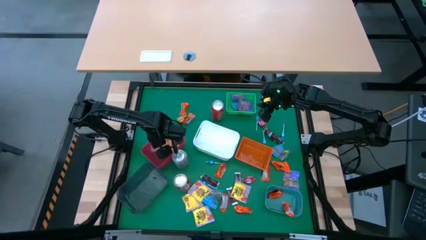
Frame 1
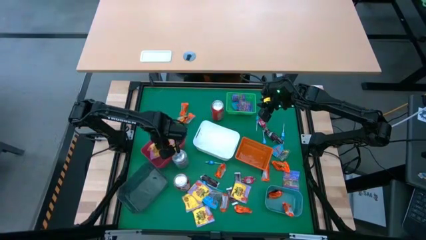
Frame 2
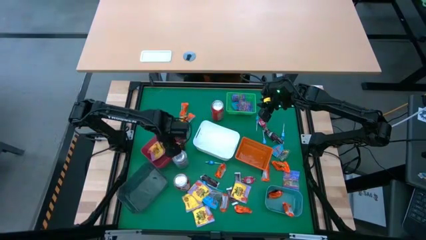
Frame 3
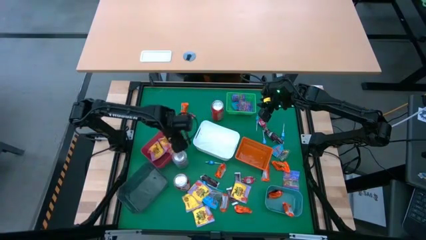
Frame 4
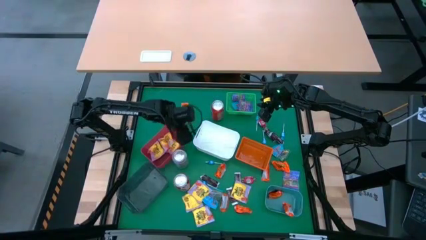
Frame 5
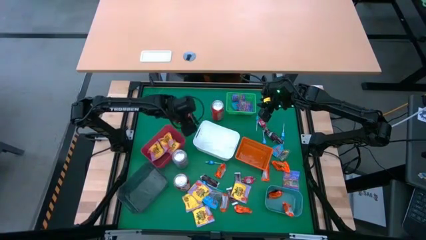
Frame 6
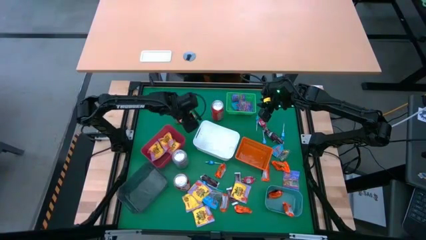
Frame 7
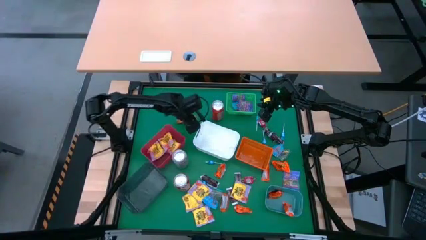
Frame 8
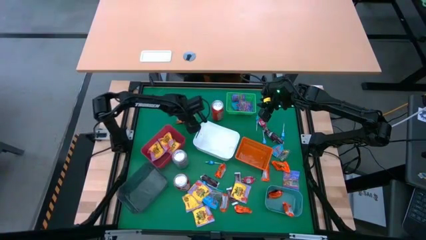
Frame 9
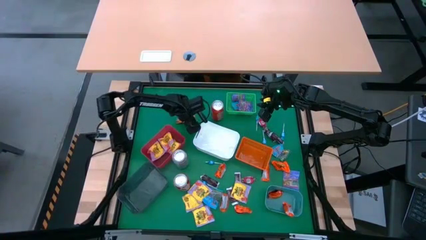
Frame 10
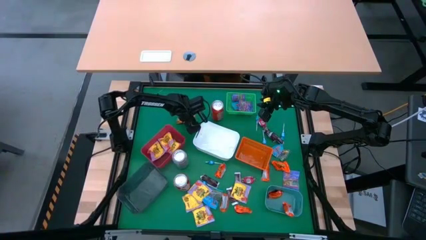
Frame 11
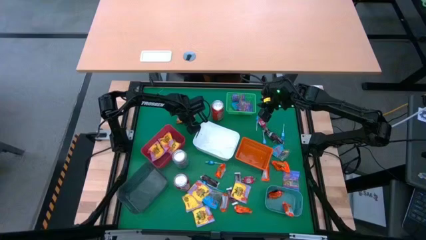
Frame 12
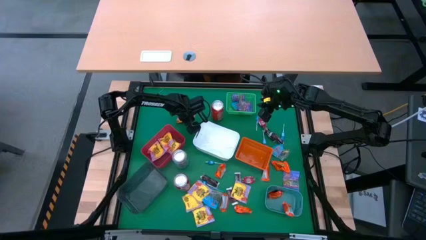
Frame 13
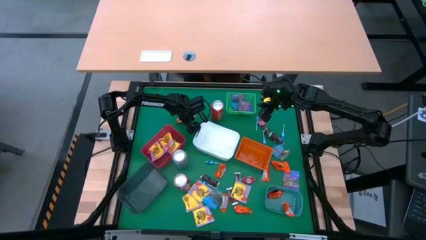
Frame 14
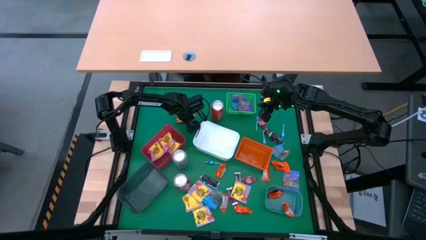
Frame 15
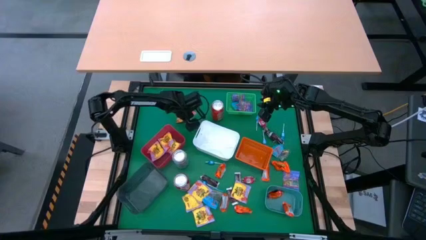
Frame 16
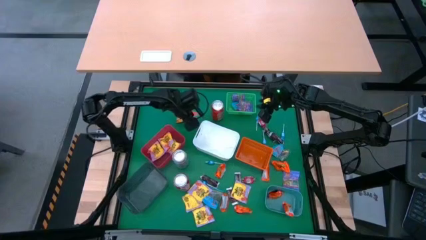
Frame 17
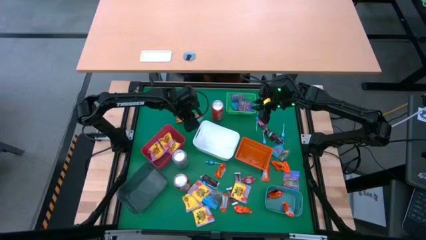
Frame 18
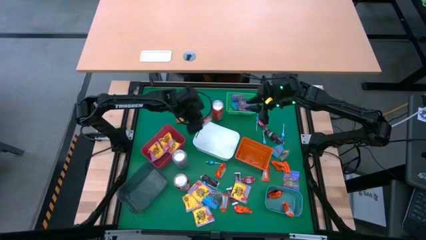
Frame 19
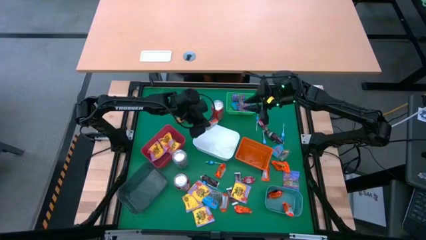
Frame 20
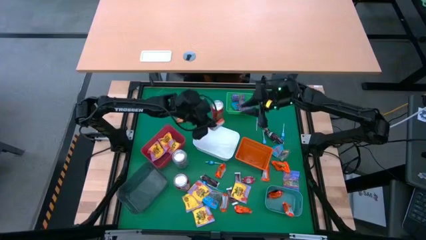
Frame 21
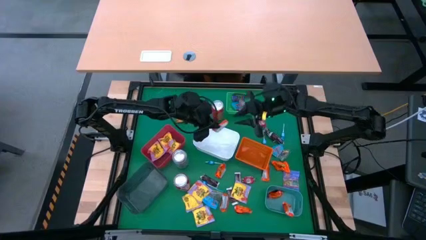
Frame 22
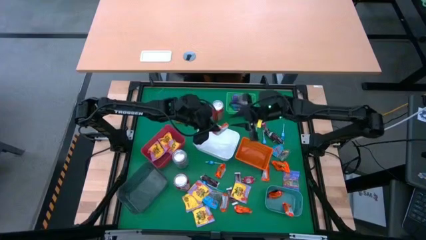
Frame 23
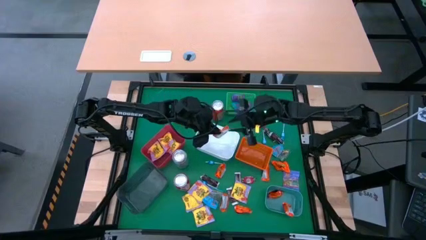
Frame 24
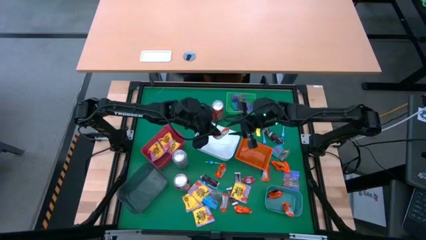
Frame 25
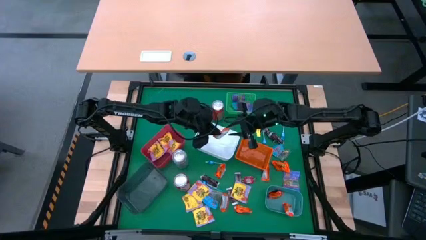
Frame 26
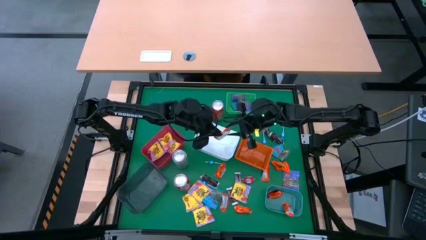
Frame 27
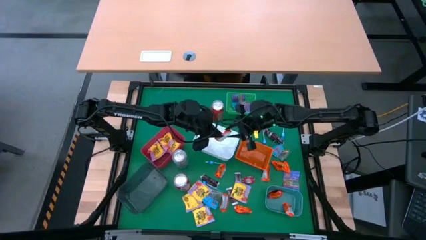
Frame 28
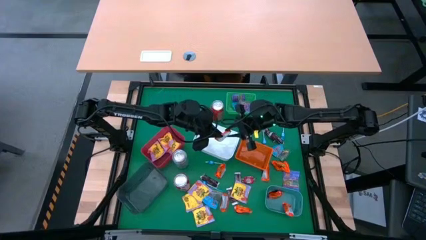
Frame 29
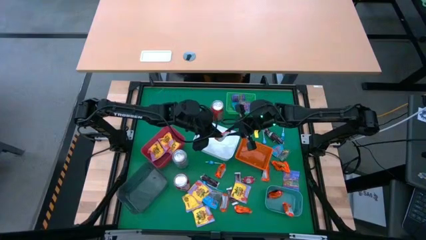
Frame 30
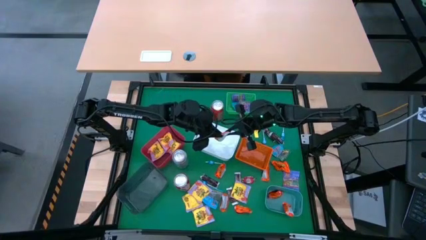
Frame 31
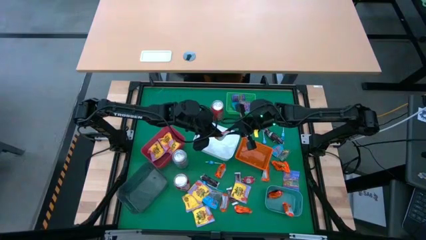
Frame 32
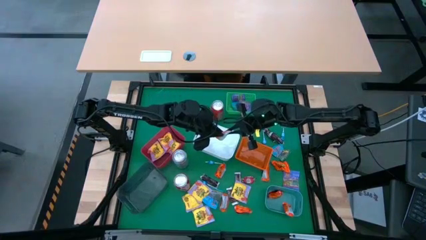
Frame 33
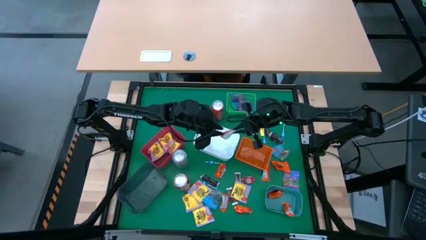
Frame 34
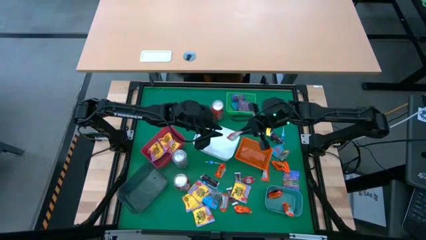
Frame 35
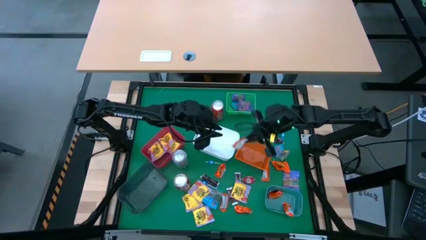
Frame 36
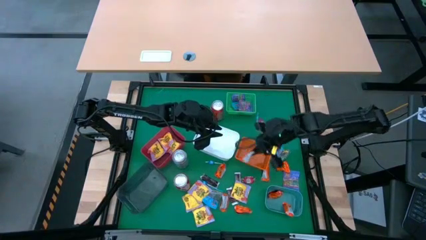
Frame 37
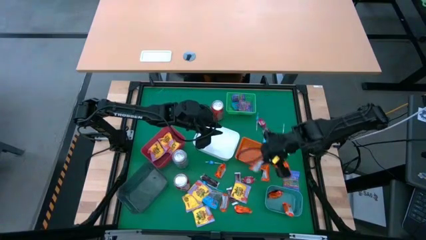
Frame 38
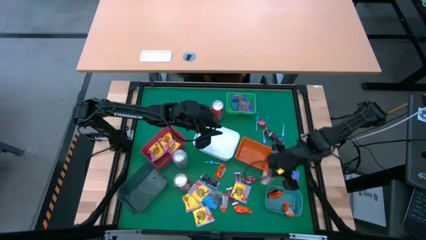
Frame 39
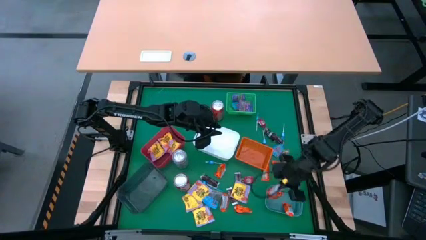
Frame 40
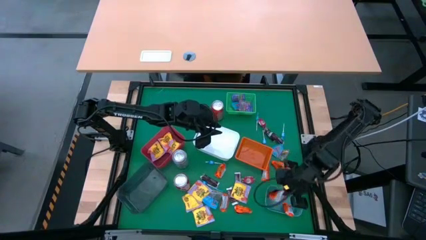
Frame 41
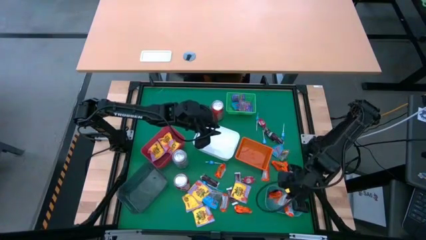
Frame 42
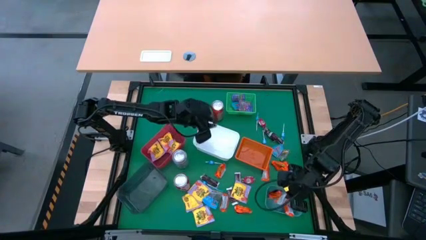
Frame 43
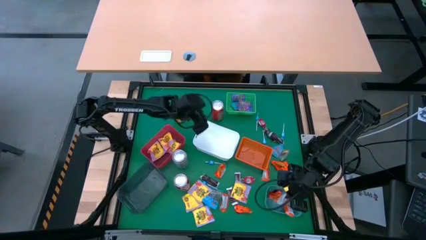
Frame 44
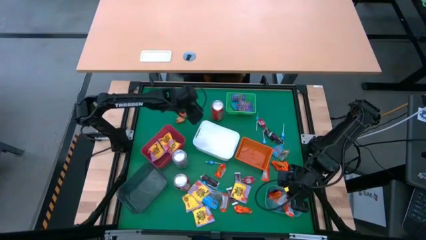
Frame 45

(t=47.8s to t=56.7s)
Task: Sort candy
Put the orange chocolate into the blue bin

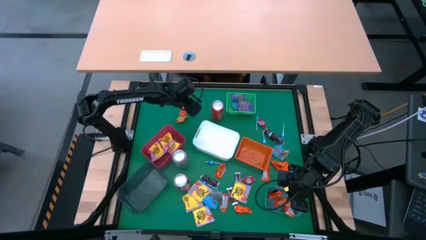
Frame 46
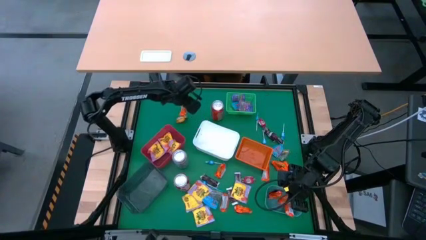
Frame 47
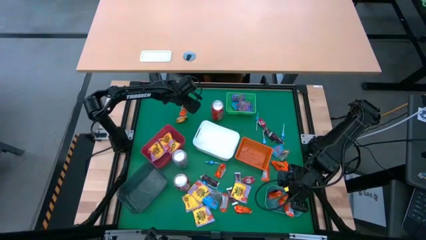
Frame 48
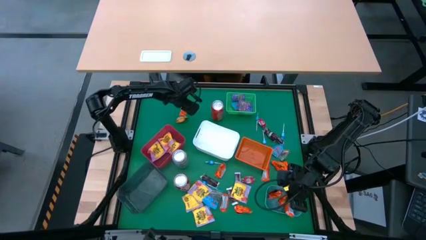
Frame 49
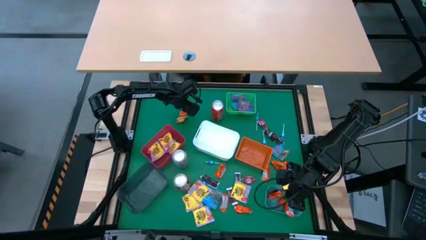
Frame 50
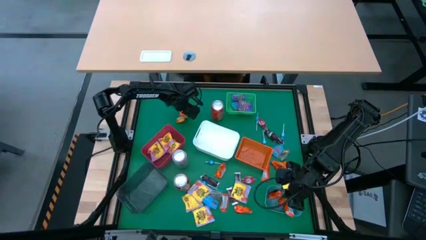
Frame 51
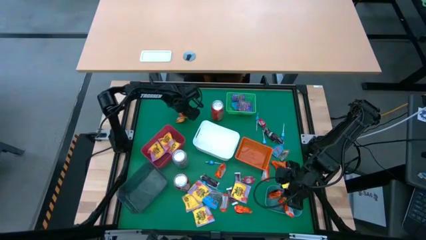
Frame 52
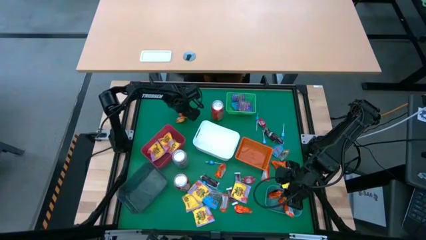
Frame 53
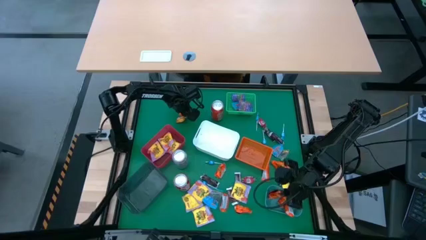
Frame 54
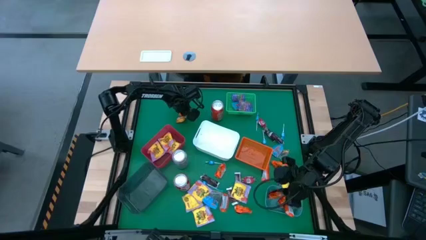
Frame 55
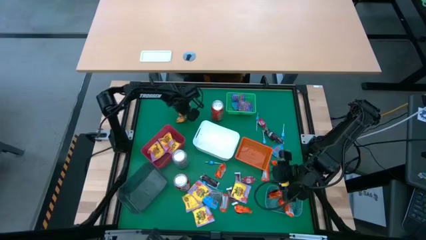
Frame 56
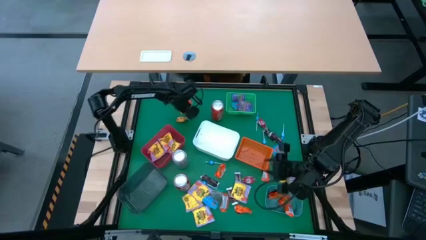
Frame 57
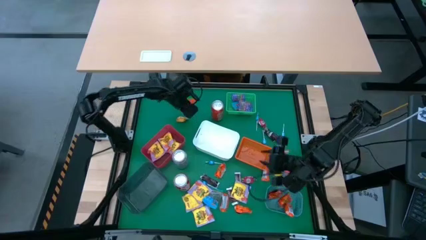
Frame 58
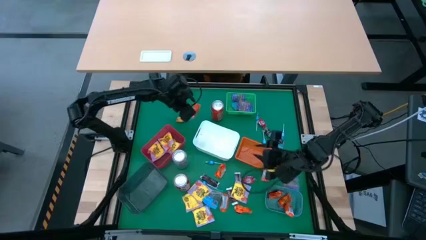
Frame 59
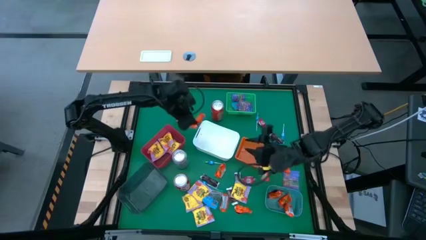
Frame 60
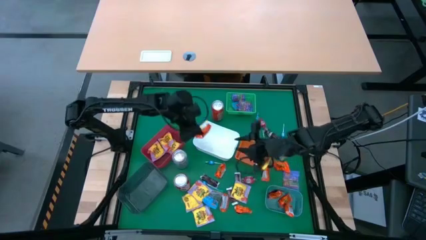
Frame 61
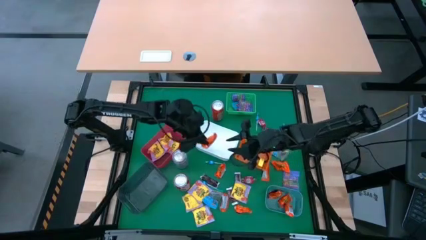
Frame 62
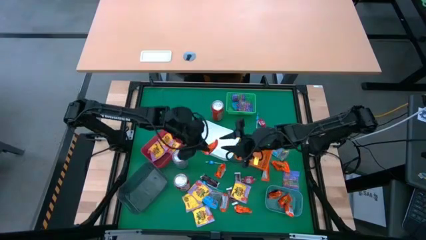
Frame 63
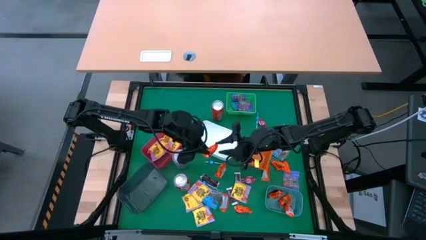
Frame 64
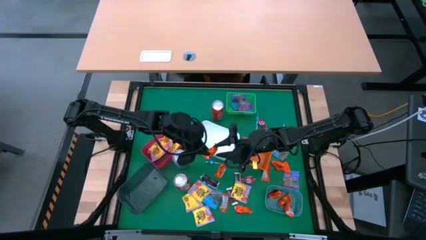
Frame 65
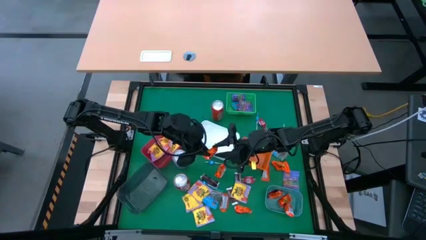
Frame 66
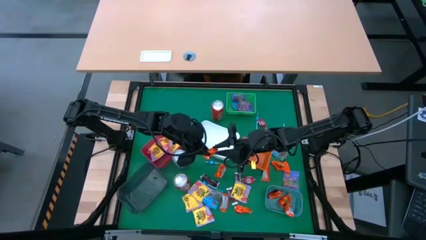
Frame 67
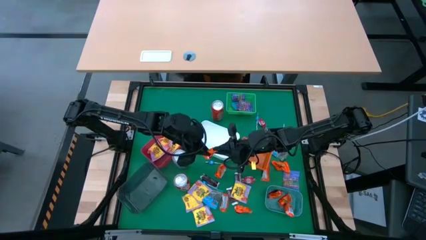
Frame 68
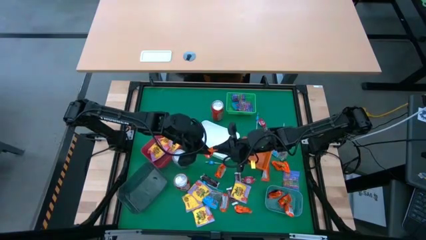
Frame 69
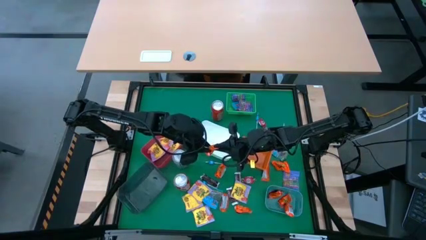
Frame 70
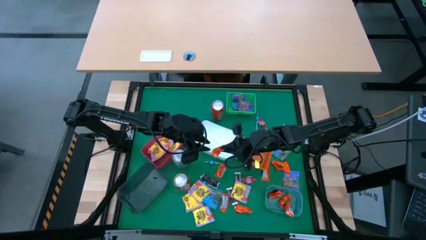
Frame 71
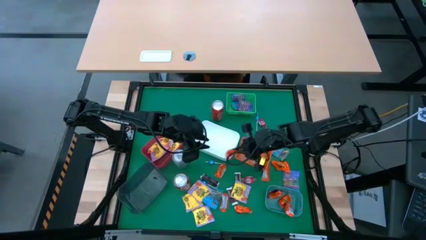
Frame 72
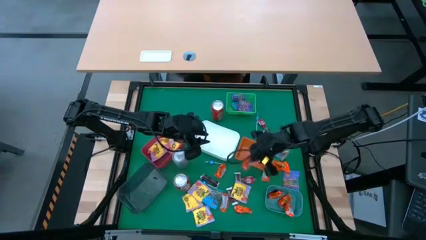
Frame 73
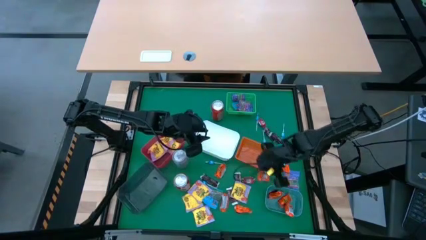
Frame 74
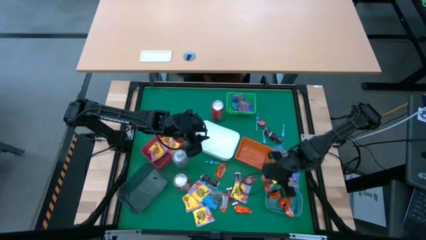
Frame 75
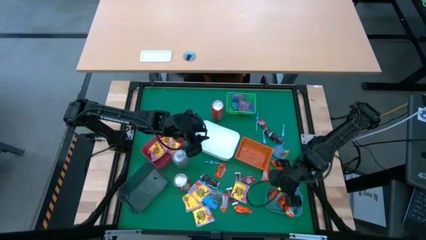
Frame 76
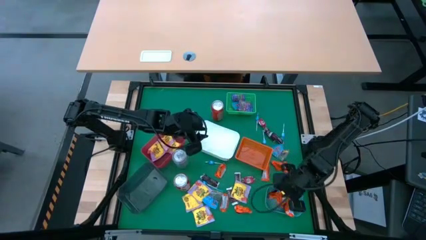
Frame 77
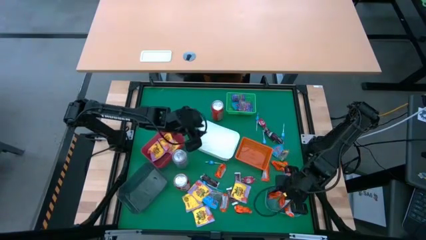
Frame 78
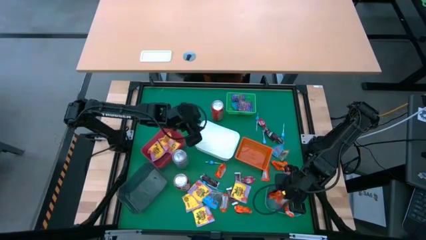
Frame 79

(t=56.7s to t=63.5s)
Put the orange chocolate into the blue bin
